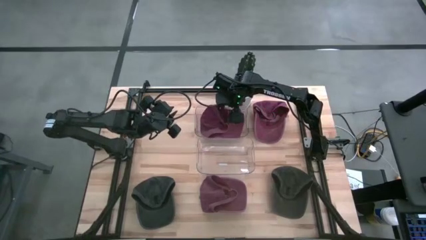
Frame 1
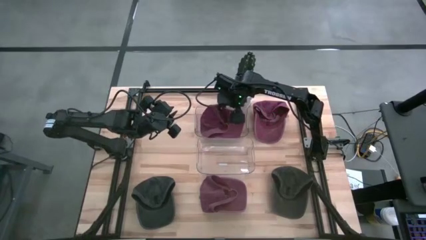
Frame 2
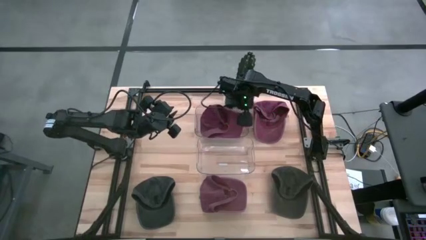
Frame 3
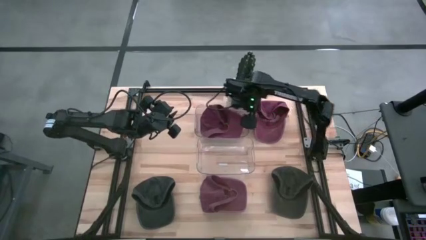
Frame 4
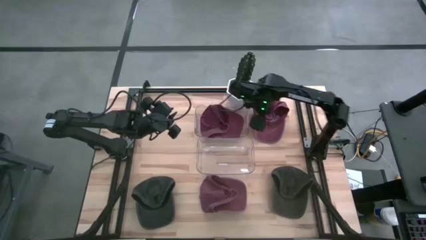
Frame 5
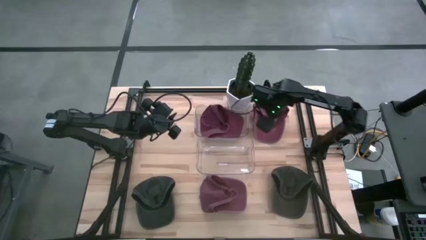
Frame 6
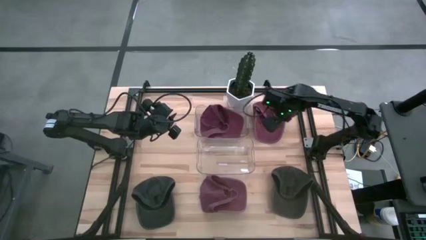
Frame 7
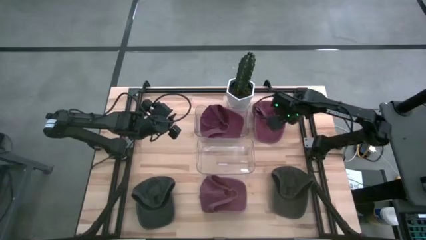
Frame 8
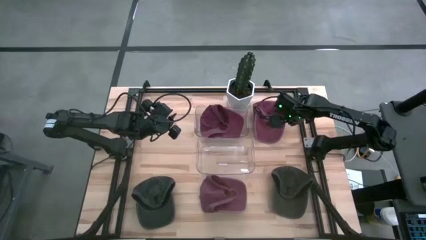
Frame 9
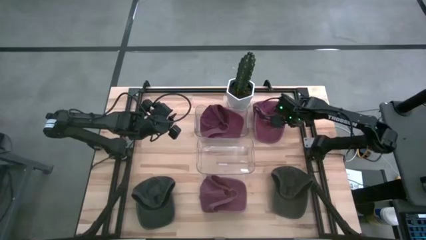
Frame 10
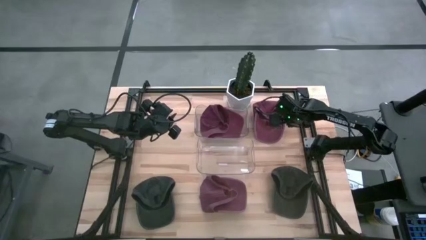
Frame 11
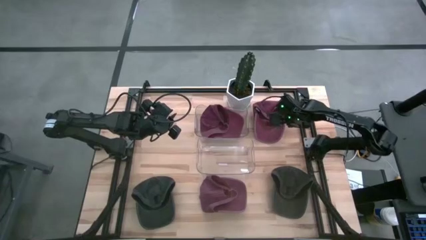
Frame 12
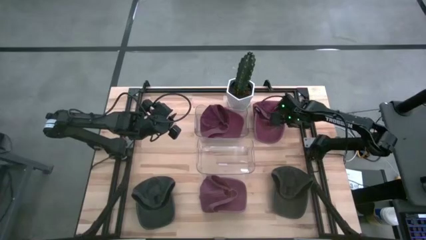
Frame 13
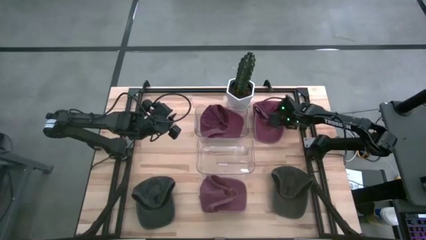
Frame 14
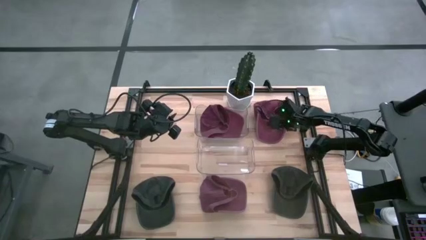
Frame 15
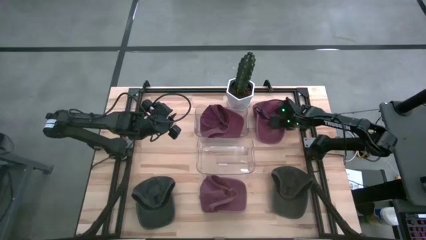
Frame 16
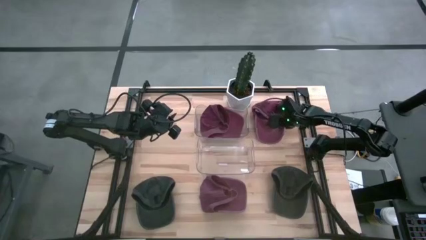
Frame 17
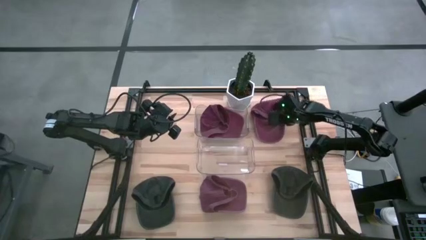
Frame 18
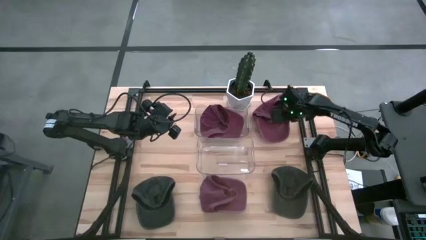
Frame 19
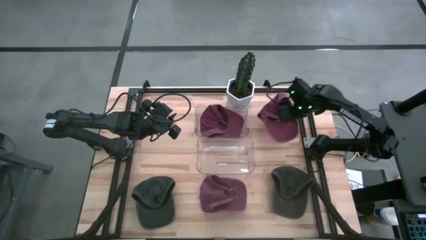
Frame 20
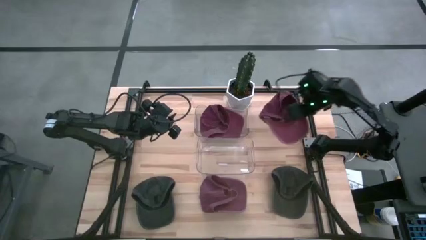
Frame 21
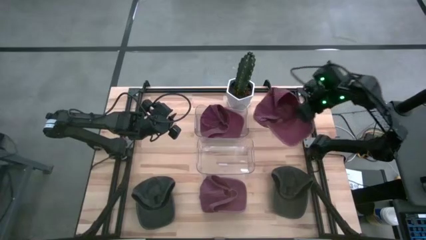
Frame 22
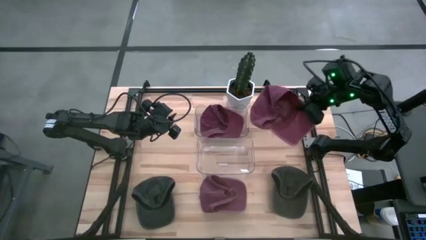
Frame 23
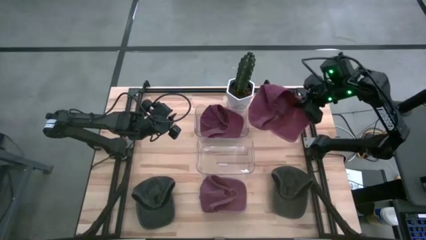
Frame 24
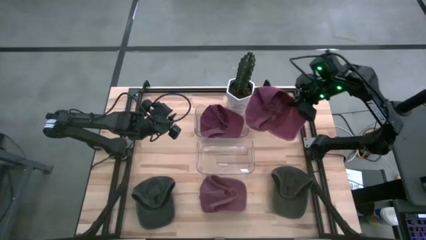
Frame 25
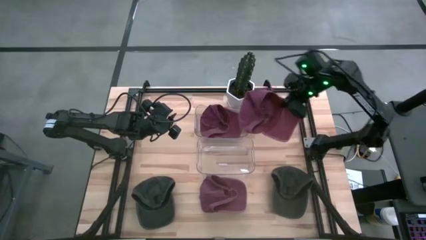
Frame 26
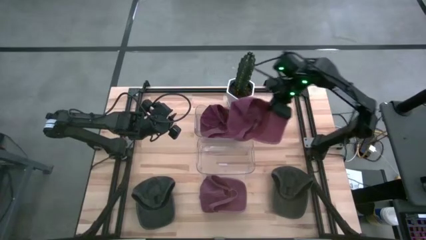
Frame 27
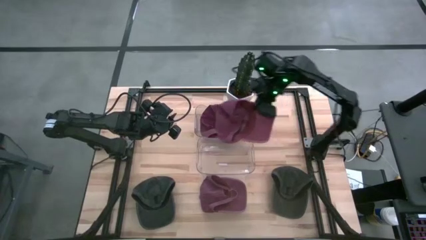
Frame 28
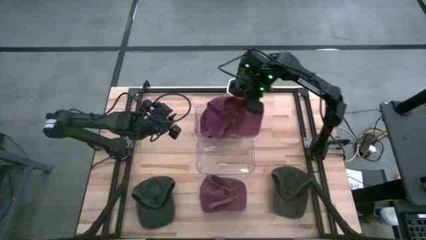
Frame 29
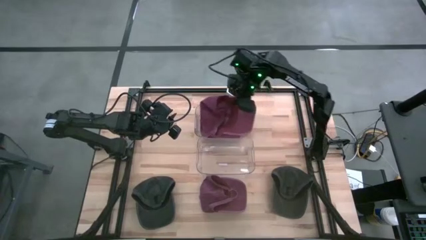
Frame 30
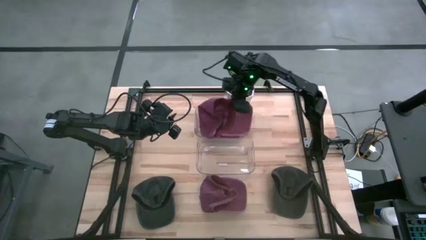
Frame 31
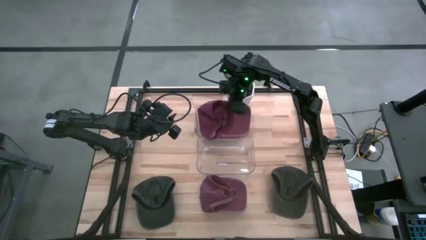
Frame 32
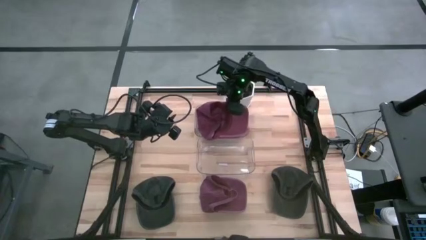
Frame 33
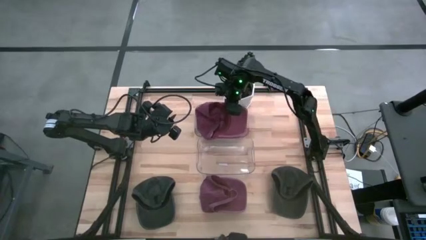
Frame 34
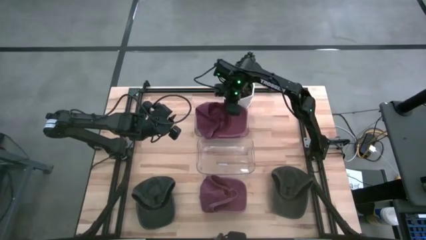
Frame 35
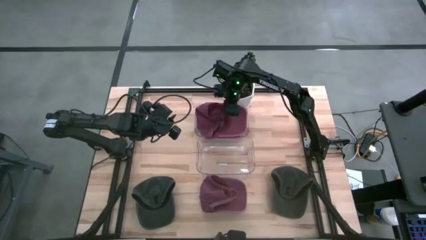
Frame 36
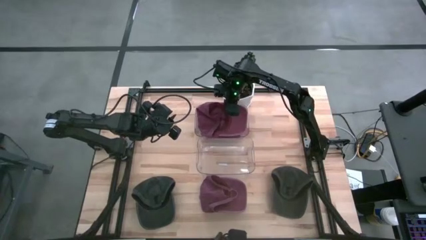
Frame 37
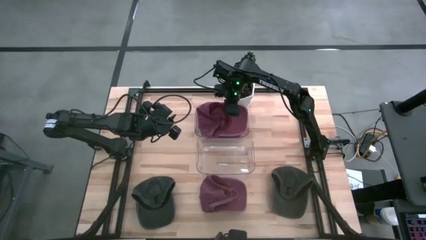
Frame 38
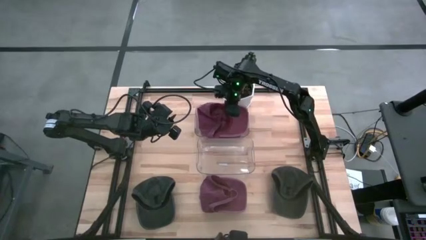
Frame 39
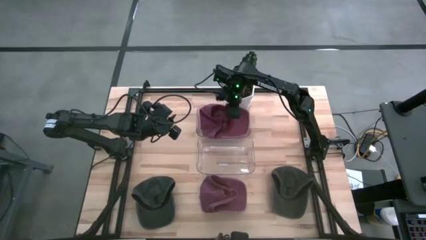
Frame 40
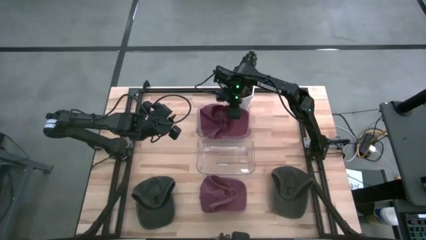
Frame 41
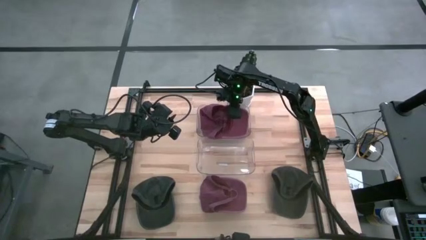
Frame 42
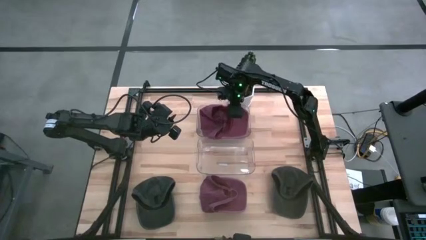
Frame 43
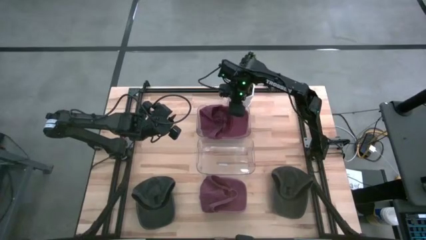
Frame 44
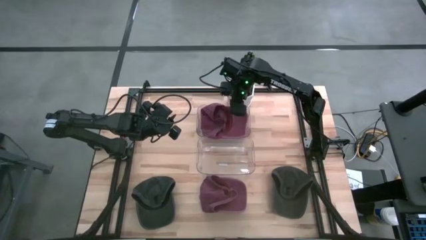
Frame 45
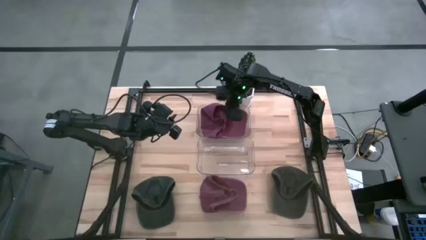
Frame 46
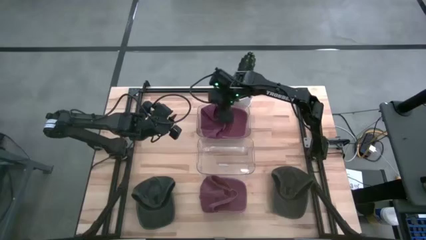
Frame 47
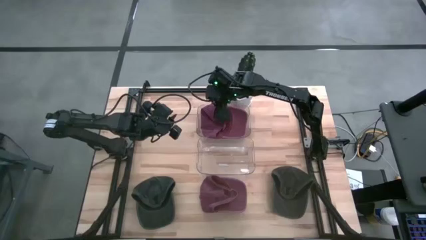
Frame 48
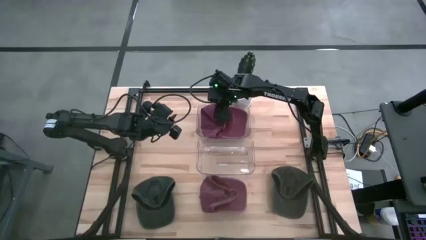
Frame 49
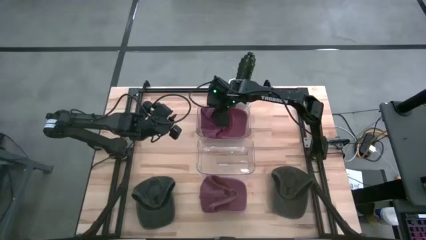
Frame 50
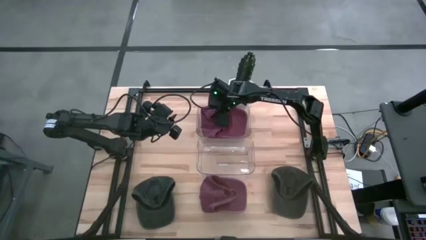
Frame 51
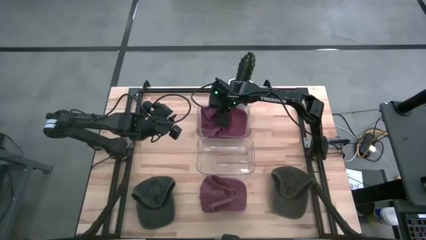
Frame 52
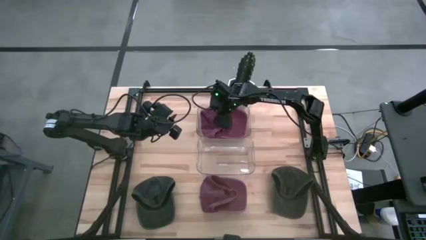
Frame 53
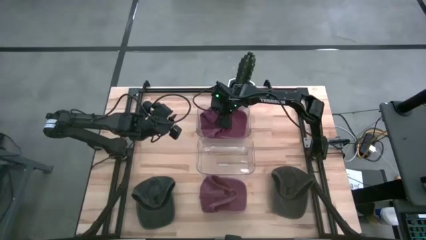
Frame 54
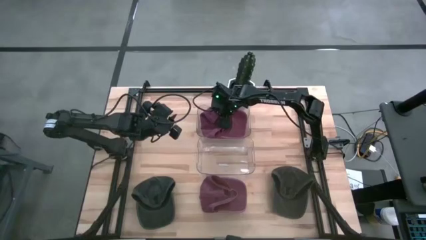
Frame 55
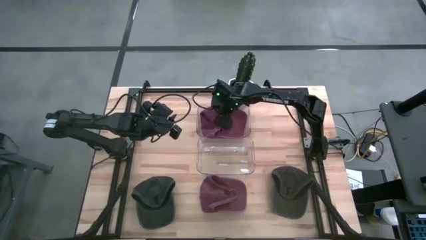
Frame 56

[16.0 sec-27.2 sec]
Task: Pick & Place hat
Put the top red cap into the top transparent bin
